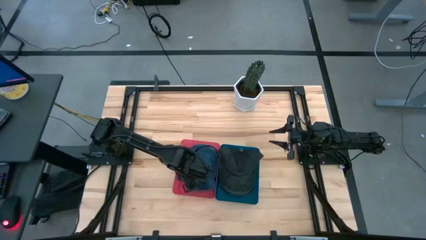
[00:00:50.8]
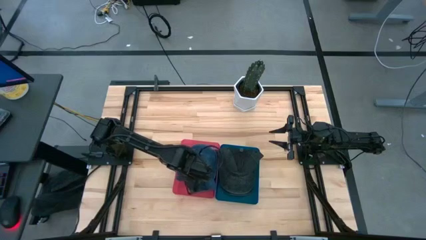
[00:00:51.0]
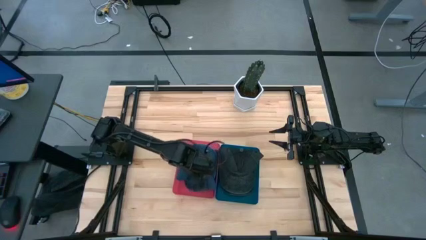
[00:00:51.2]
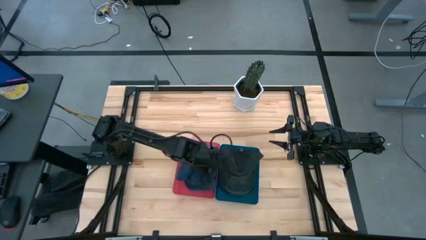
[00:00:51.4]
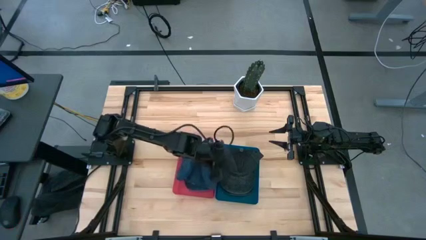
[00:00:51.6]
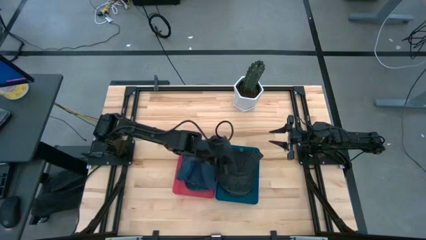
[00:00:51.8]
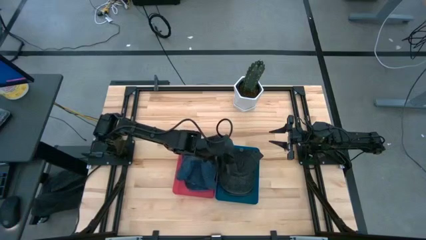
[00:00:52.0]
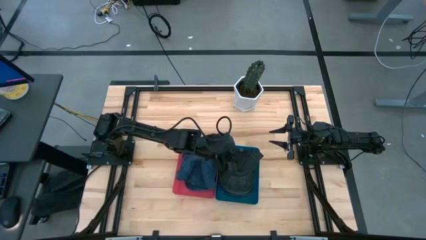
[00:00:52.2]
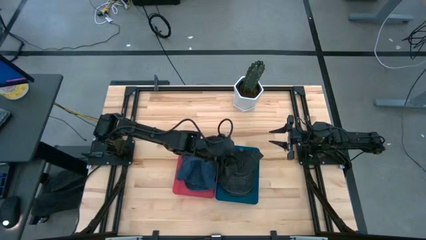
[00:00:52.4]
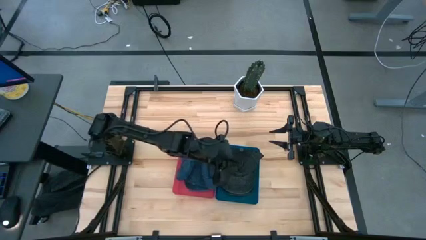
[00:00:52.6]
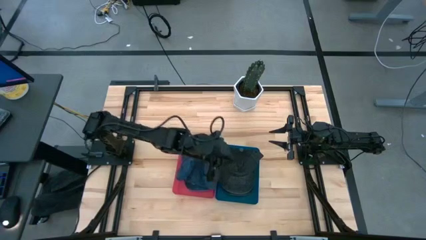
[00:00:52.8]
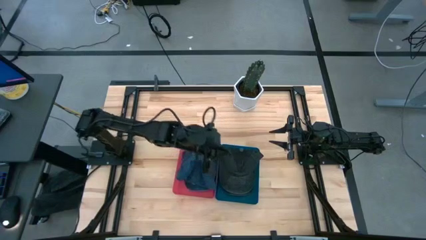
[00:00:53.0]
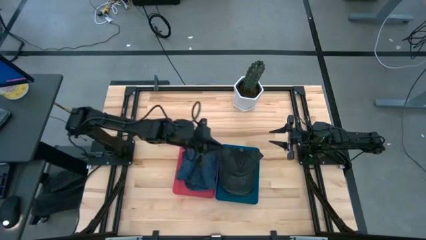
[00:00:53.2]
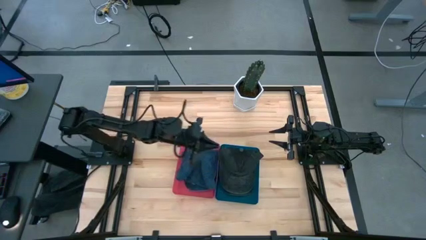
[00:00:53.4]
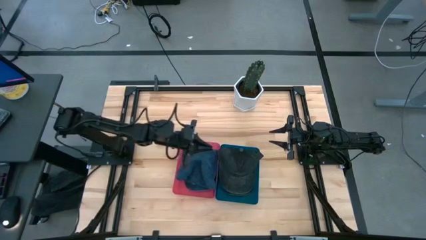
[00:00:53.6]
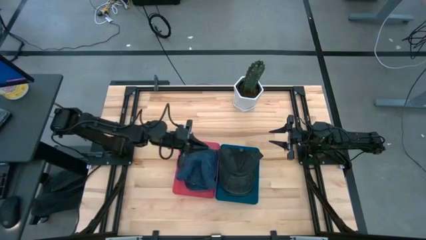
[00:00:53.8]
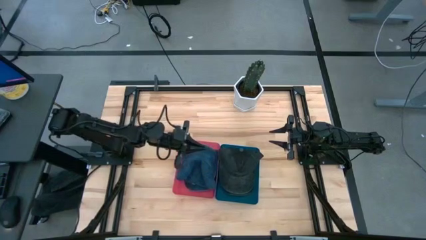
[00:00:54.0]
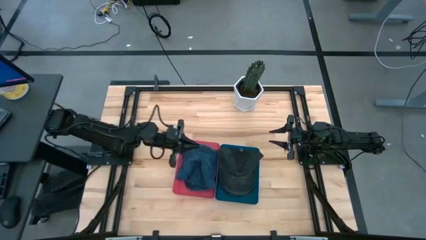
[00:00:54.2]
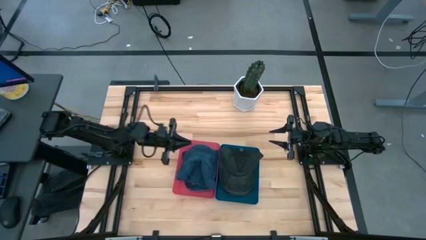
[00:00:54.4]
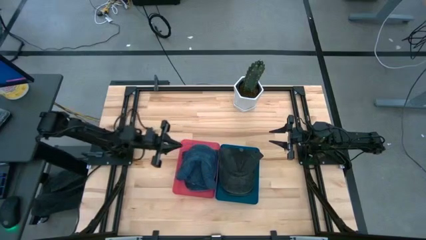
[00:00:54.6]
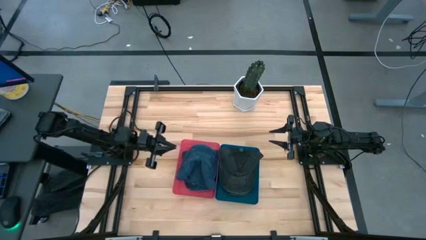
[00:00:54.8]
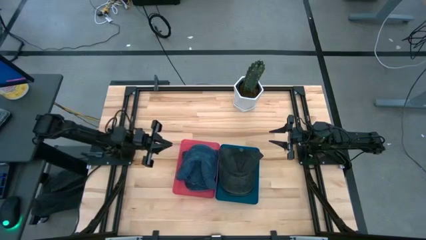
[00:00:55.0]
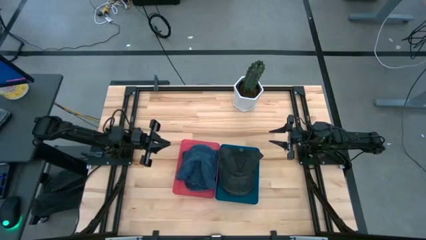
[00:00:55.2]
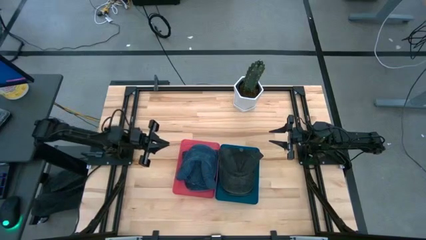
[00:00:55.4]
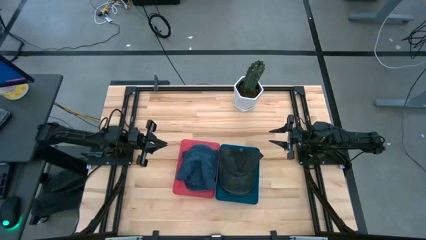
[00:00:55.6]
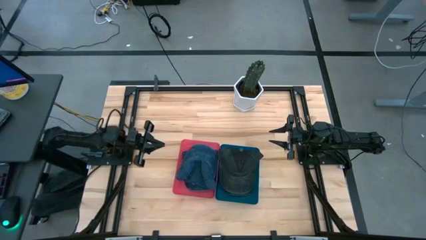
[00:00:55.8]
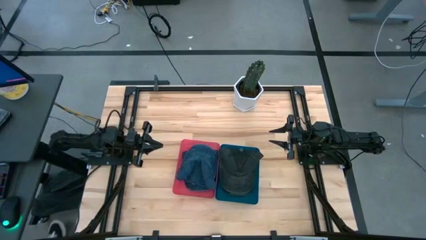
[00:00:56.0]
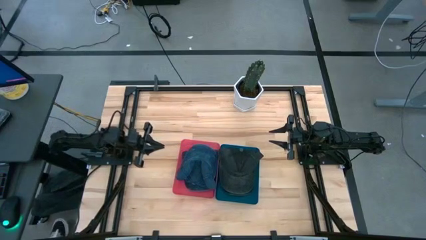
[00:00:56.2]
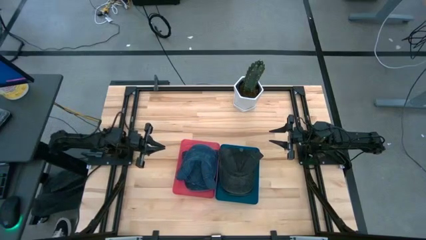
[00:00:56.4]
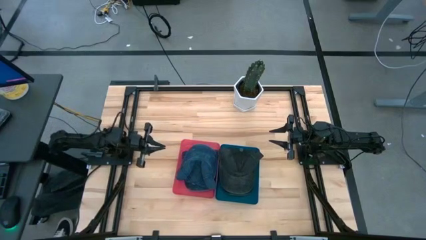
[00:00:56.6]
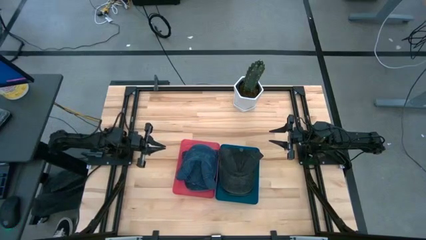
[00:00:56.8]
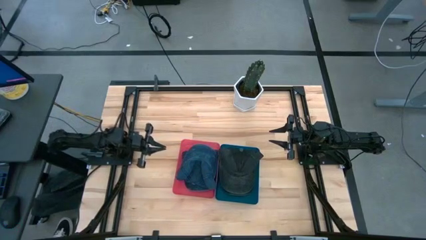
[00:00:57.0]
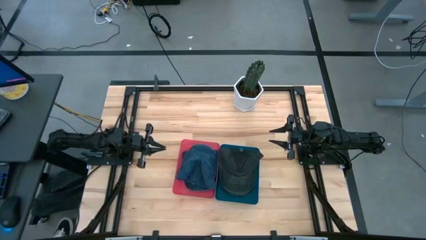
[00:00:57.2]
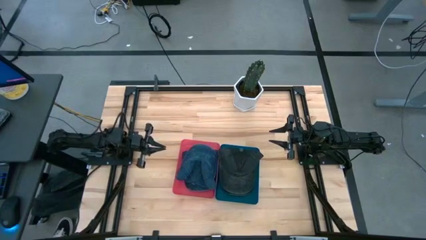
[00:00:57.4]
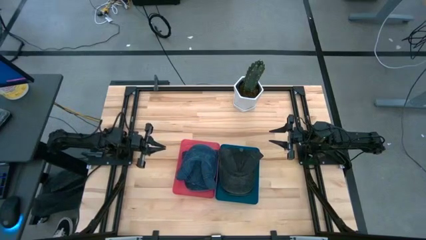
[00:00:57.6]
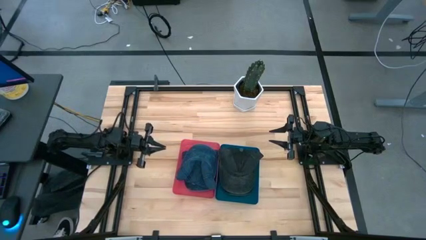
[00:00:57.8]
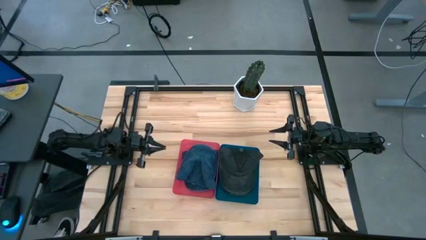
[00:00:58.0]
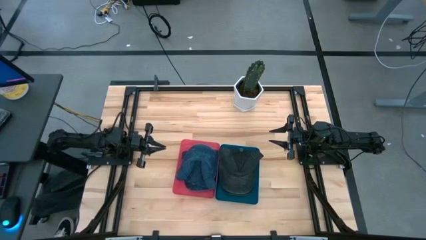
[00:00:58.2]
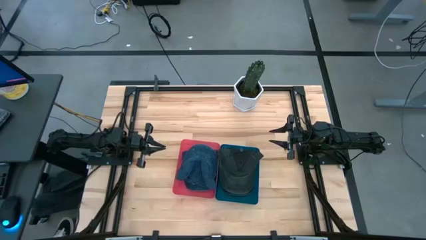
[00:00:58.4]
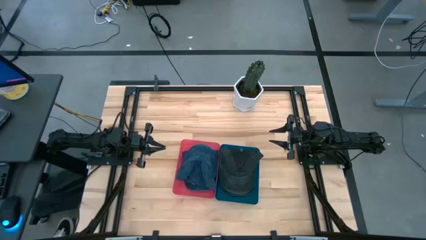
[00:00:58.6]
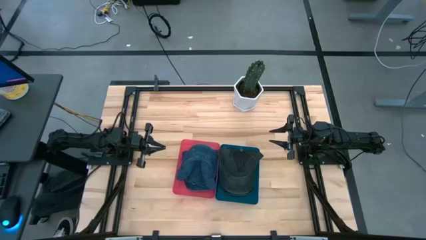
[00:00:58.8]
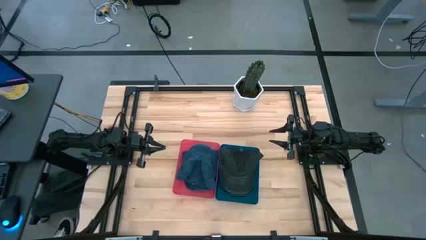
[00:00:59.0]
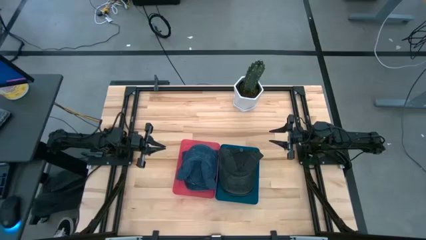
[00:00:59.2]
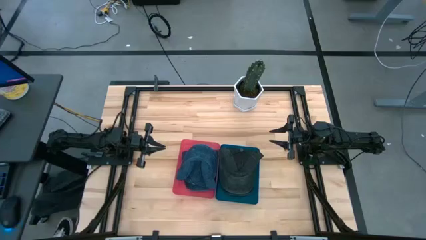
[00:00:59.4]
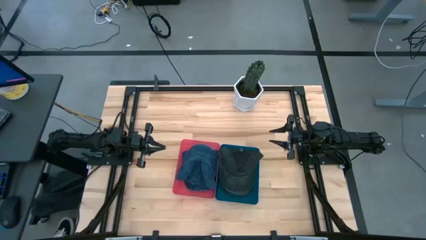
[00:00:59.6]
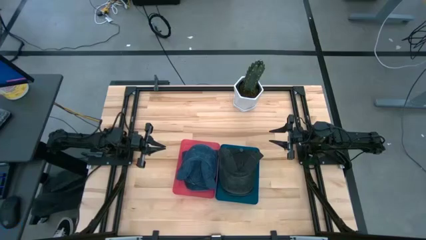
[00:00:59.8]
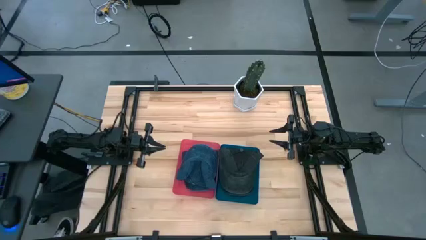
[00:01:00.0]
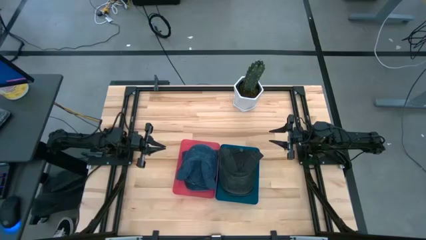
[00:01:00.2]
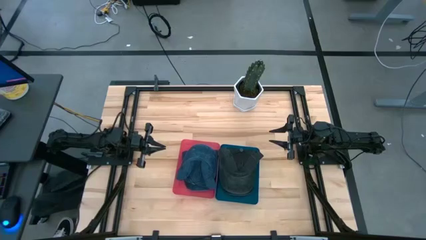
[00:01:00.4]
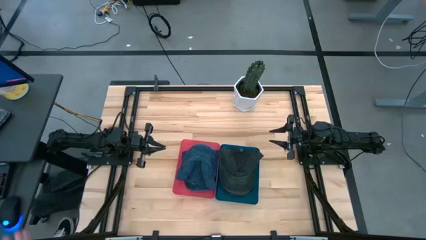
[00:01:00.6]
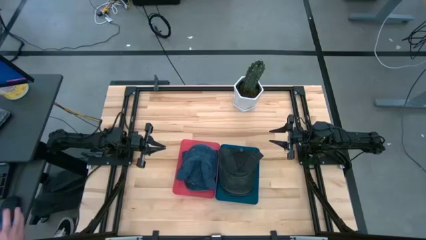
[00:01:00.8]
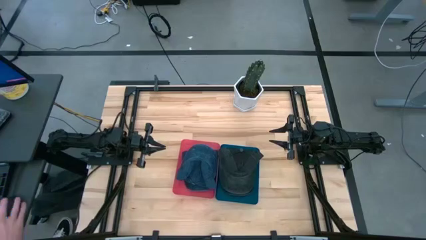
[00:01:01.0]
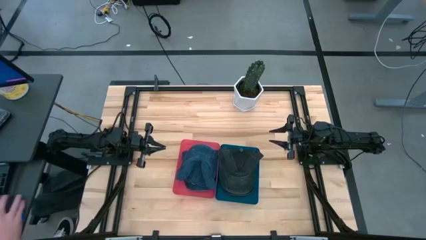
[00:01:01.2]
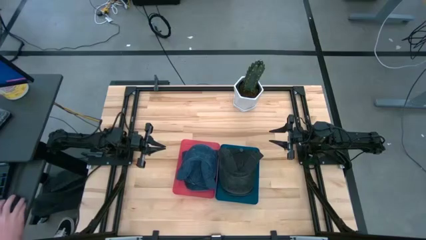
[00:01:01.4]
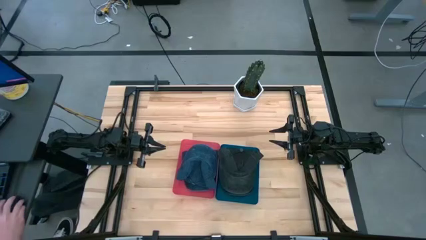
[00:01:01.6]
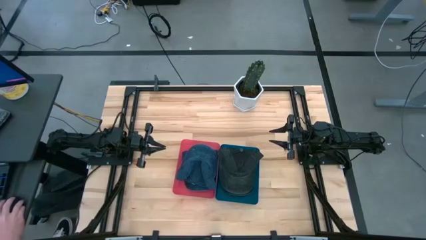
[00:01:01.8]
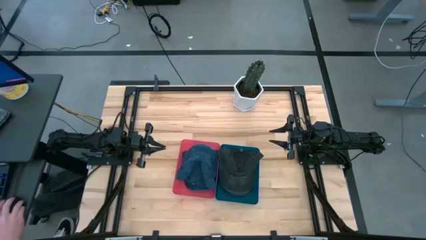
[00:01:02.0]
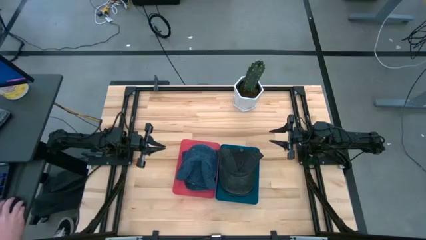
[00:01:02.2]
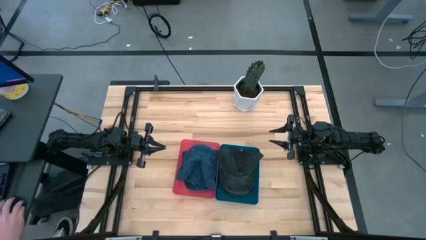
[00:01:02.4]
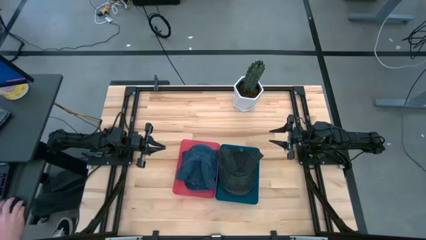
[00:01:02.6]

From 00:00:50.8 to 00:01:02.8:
Task: Pick & Place hat
Return to Home Position

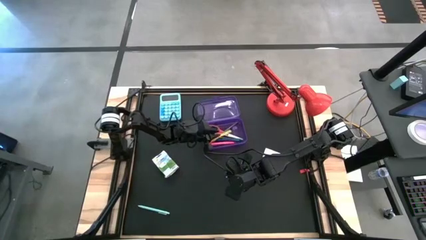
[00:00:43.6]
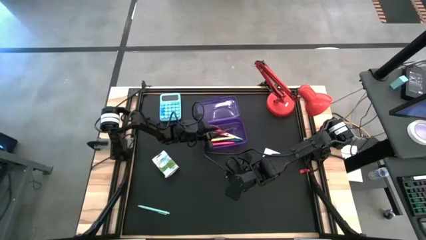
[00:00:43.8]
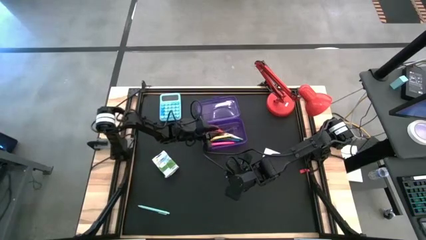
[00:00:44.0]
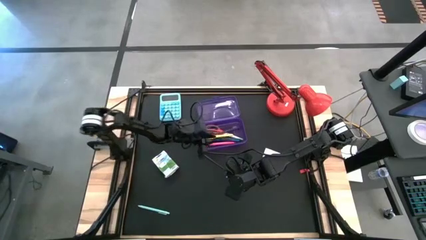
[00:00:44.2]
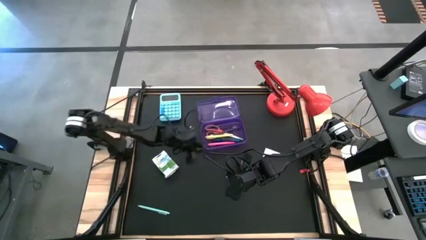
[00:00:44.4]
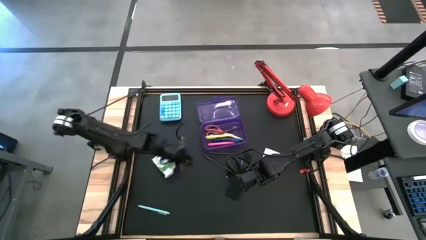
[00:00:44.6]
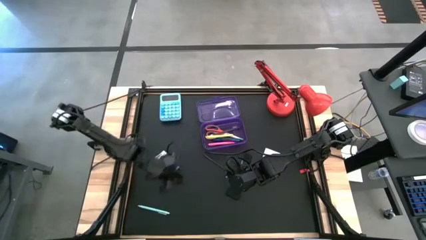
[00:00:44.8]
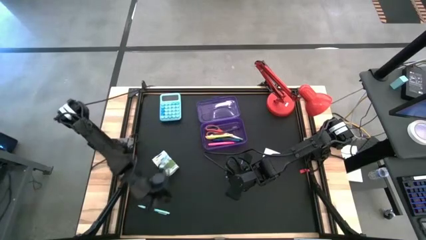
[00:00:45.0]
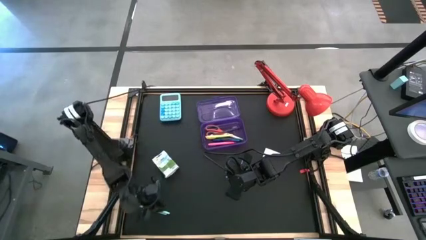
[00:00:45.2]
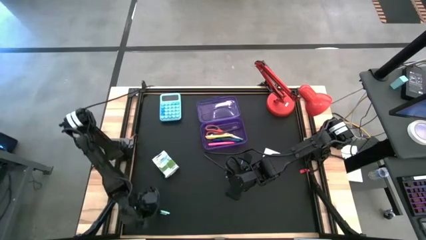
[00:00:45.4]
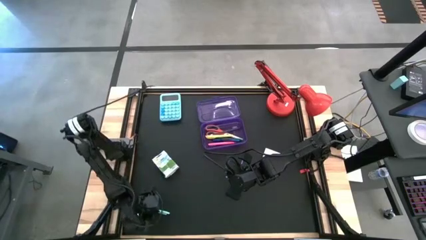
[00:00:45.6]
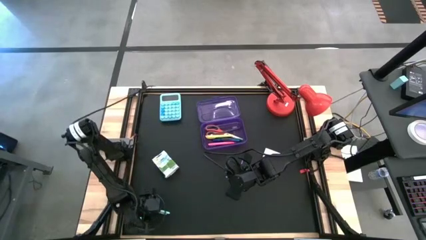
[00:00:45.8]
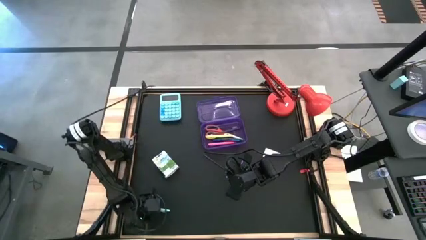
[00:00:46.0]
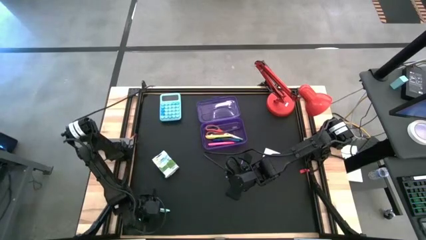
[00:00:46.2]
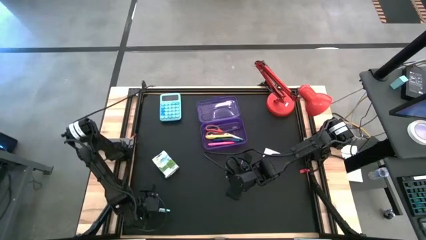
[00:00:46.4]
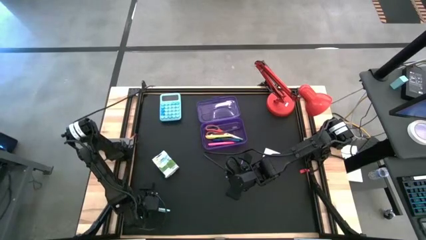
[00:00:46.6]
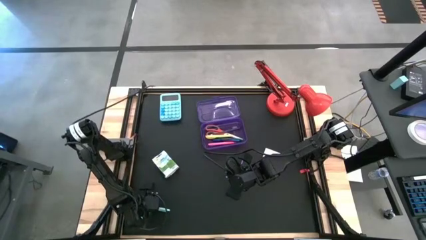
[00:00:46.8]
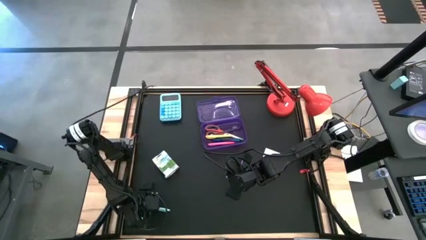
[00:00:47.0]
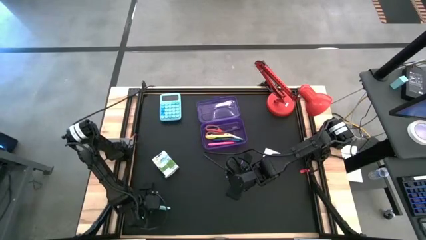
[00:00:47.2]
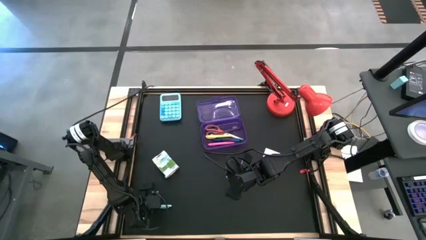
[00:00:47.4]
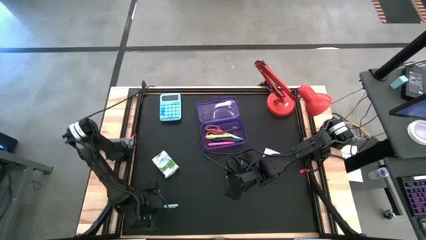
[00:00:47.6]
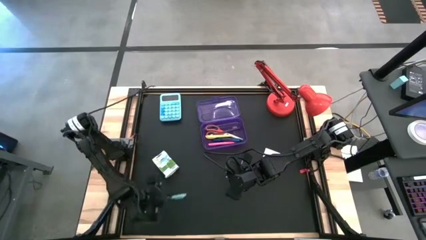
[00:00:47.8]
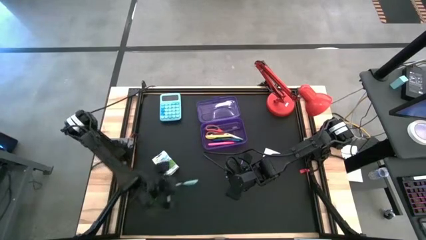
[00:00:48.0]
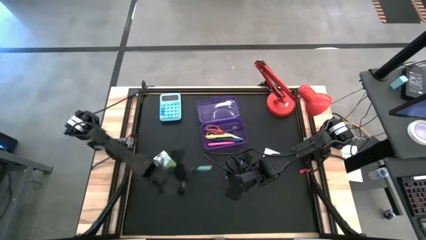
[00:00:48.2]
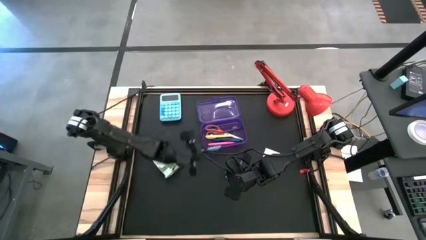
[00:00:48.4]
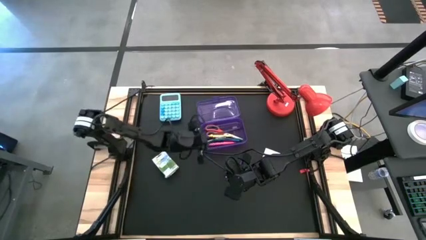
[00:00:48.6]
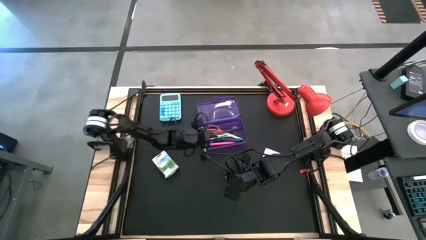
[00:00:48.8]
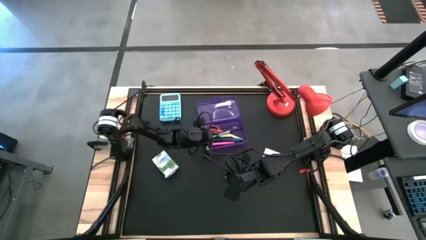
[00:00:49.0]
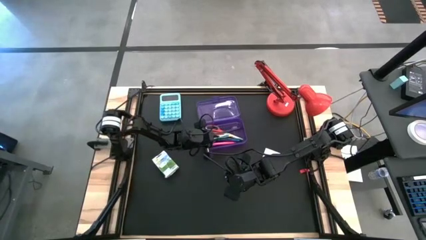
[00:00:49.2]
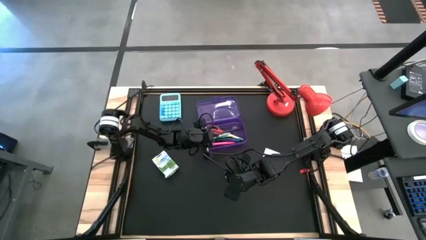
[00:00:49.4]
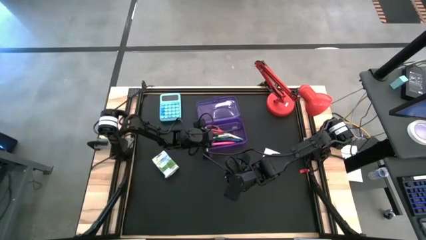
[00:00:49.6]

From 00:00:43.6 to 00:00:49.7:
Task: Pack school essentials
Put the light blue pen into the violet supply box
